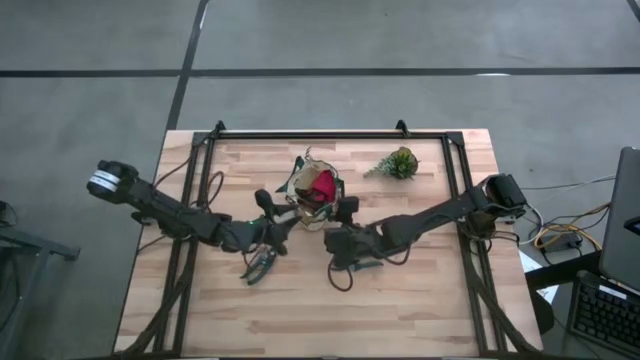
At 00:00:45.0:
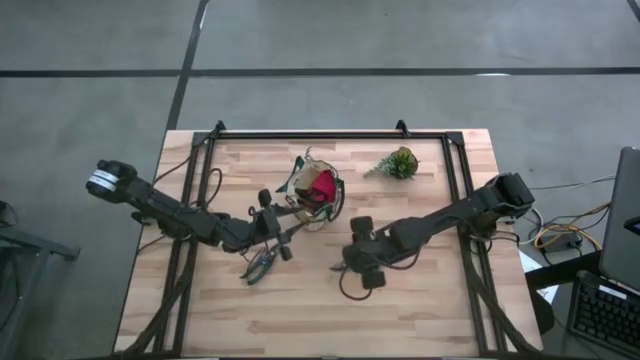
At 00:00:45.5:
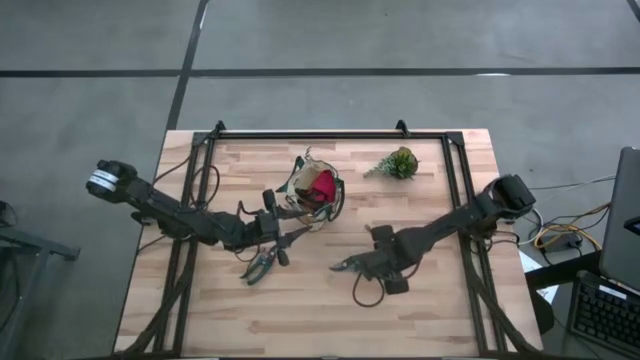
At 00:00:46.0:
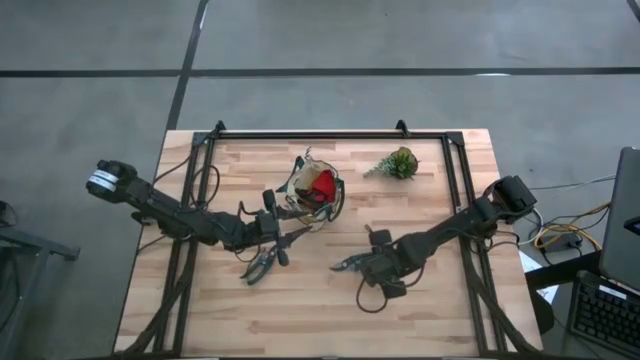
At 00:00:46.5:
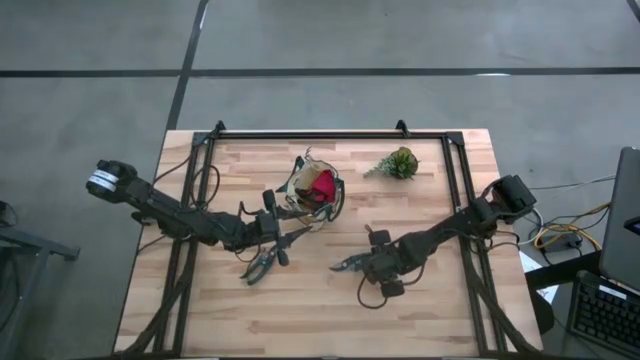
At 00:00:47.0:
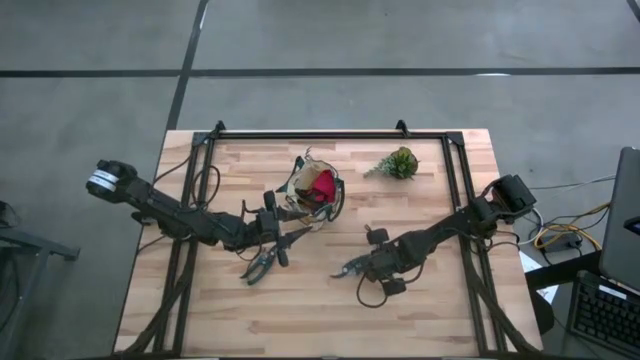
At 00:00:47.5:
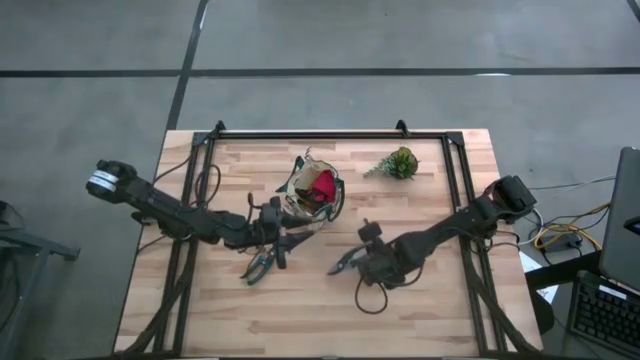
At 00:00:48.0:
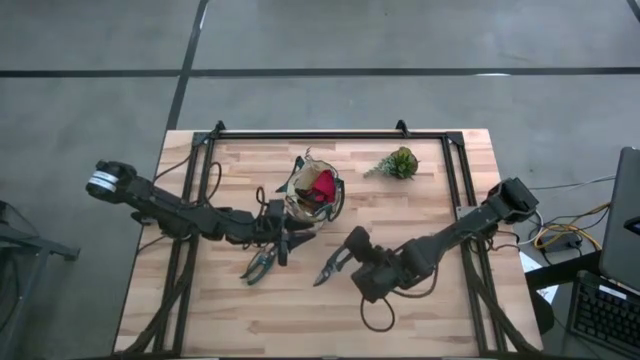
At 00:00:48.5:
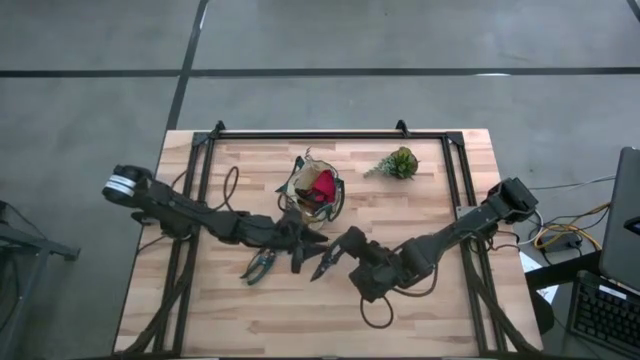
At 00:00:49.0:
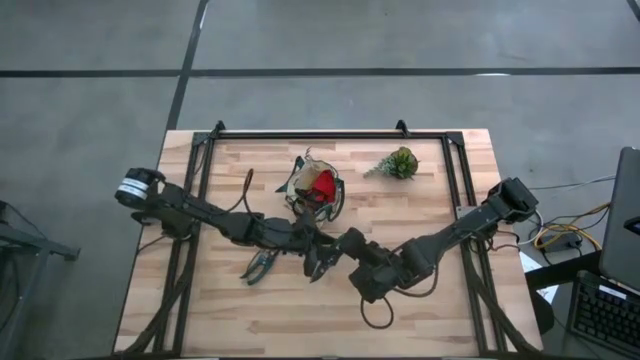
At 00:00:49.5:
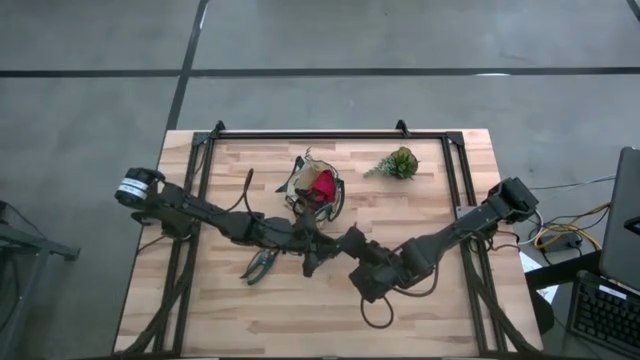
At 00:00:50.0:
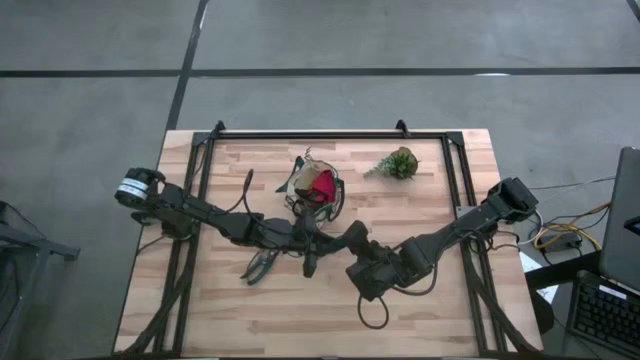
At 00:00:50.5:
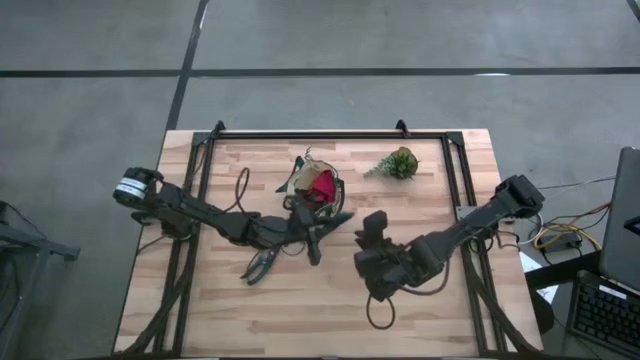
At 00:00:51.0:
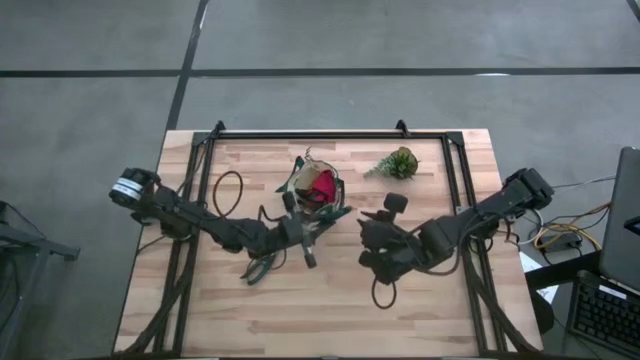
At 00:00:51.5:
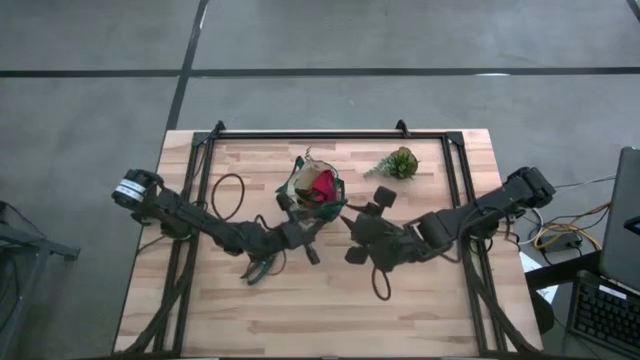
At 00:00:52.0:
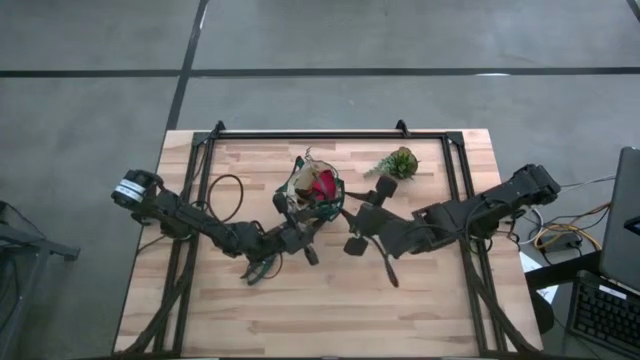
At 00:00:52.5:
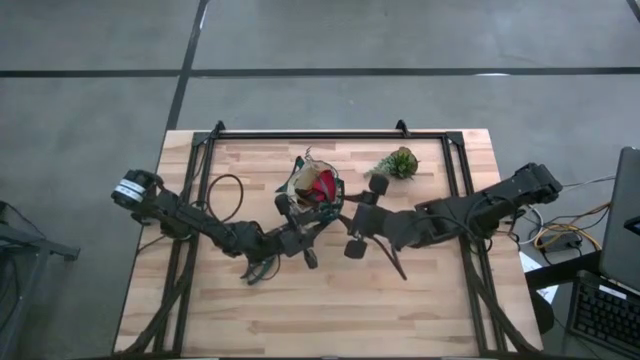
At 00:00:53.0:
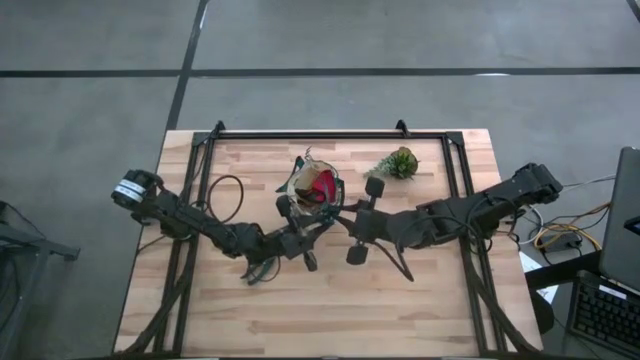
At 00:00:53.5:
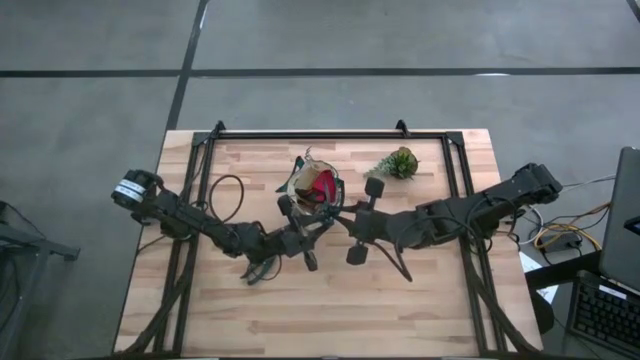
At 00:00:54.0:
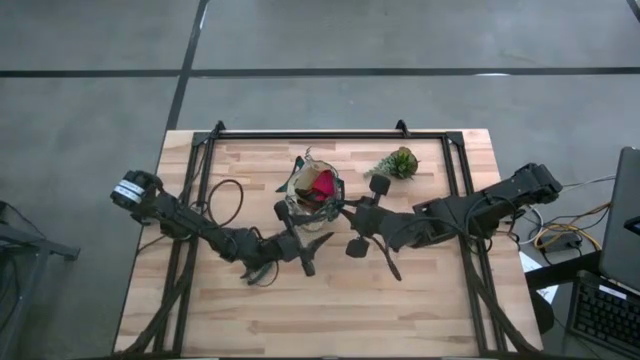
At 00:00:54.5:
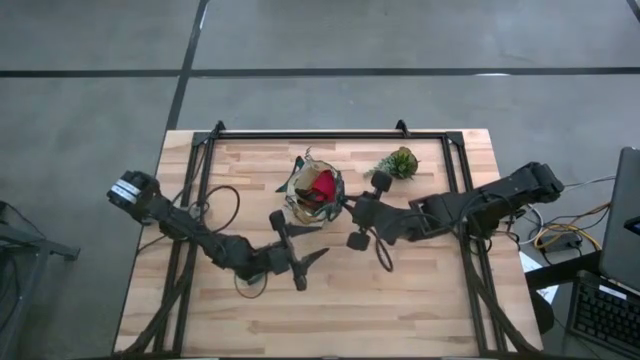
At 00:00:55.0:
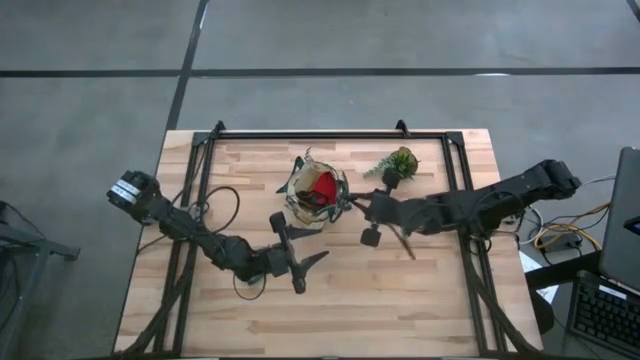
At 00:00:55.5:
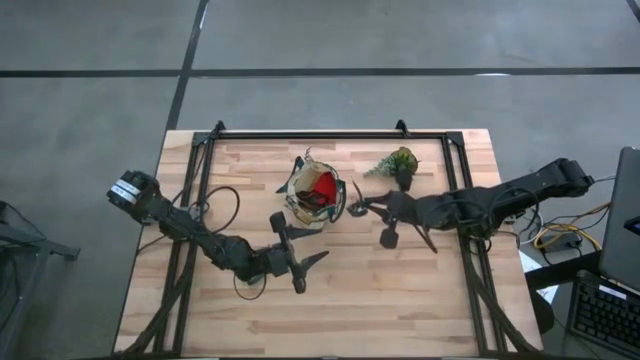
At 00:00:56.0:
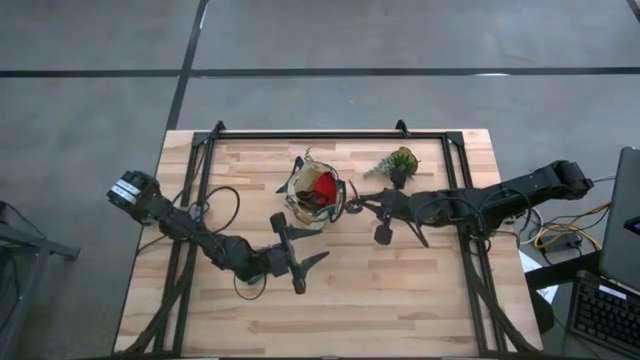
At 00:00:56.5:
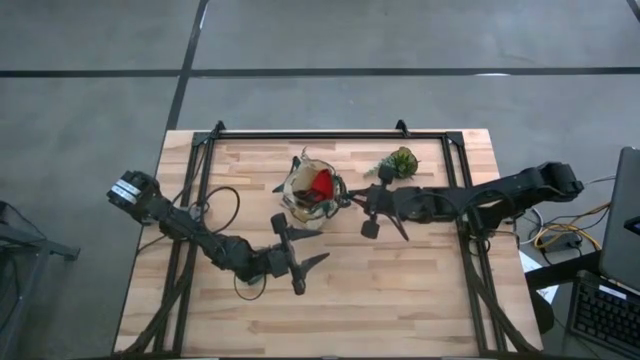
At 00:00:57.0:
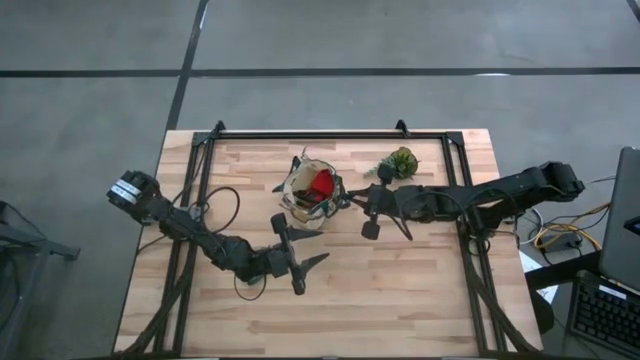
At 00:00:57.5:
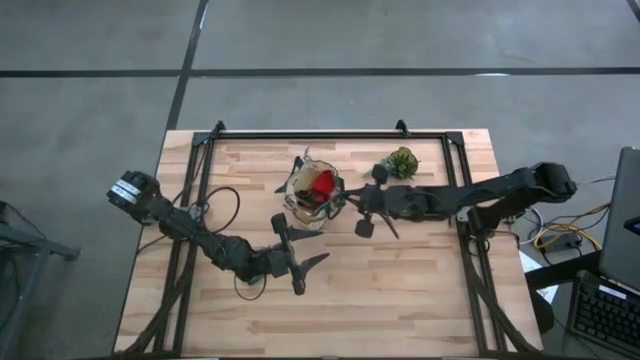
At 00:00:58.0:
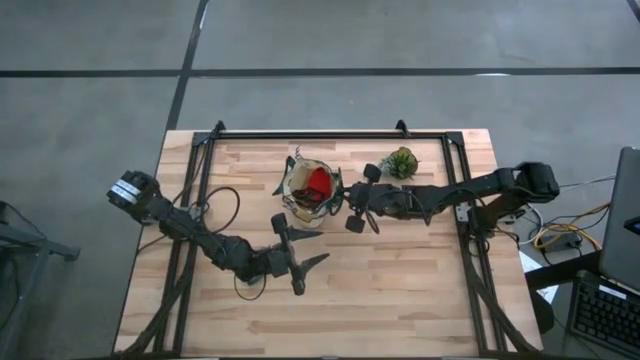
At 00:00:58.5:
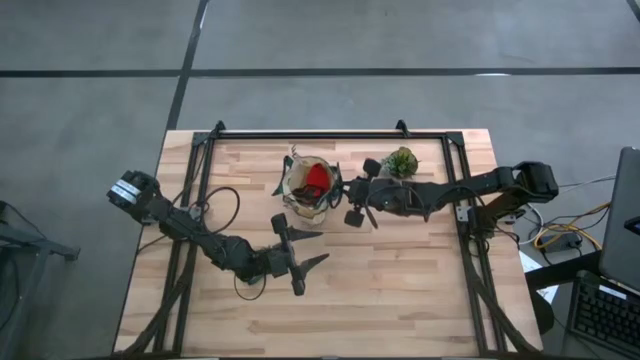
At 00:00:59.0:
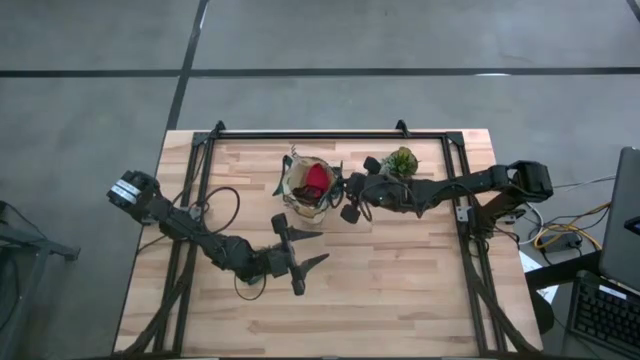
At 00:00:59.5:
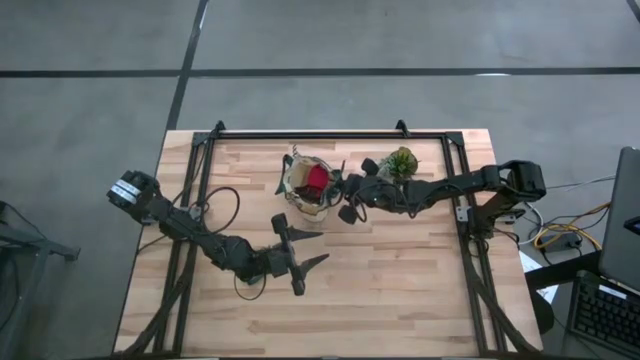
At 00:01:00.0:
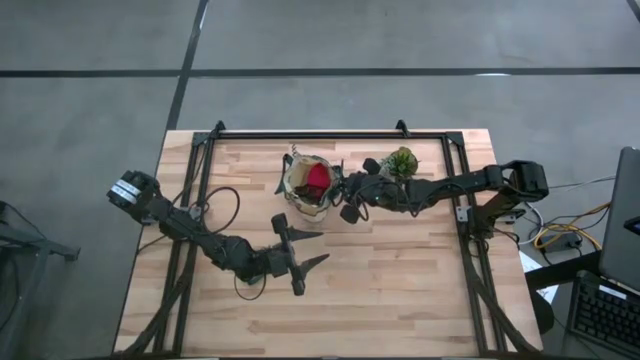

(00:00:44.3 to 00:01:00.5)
Task: Pick & Place Garden tools in Gardening bag
Put the right shear scissors into the gardening bag
